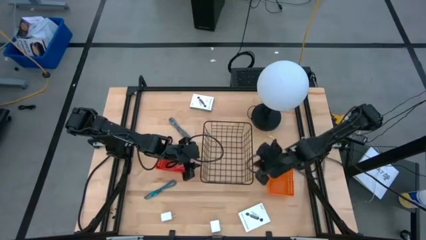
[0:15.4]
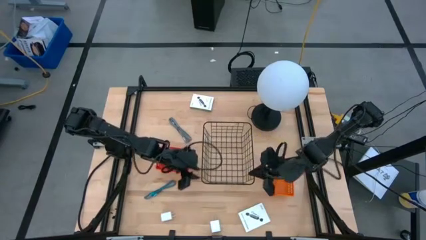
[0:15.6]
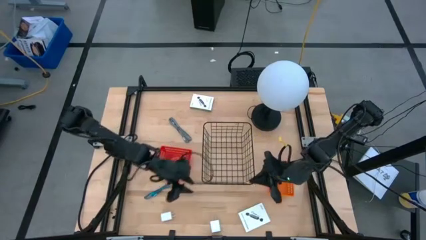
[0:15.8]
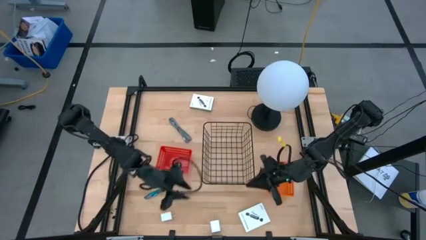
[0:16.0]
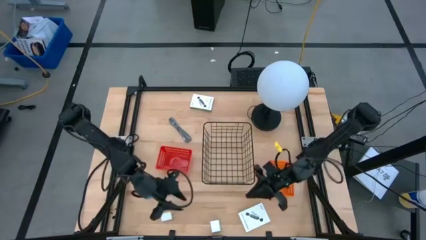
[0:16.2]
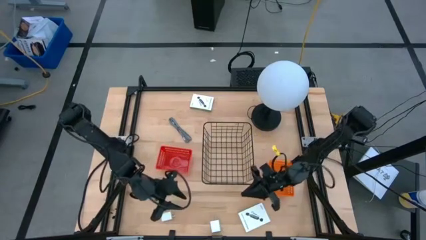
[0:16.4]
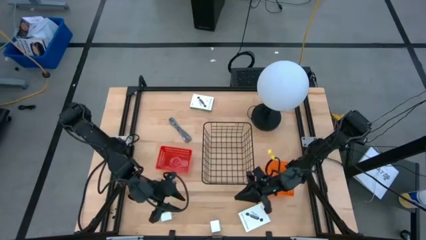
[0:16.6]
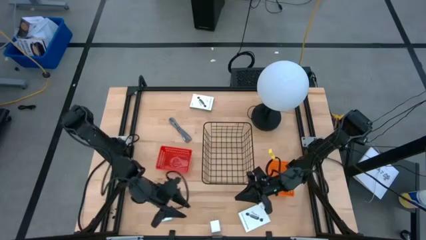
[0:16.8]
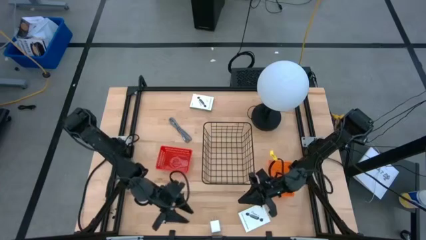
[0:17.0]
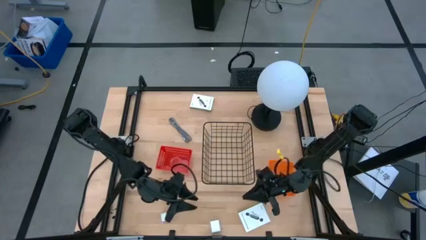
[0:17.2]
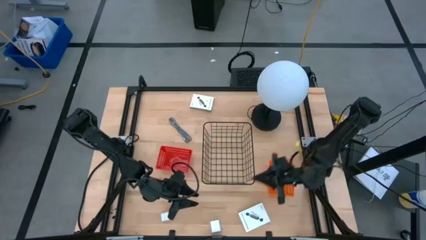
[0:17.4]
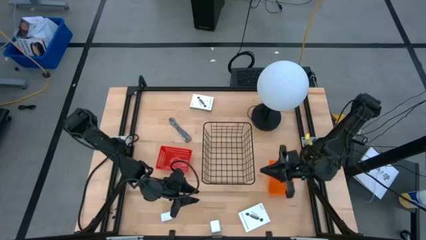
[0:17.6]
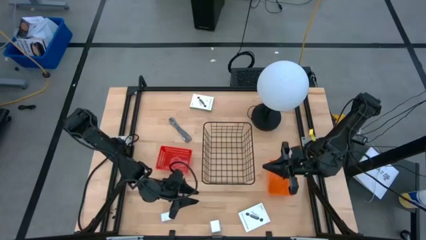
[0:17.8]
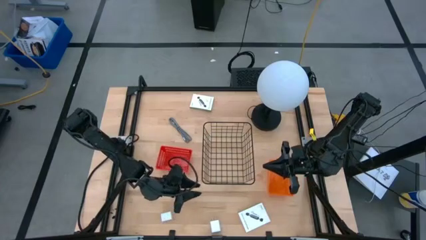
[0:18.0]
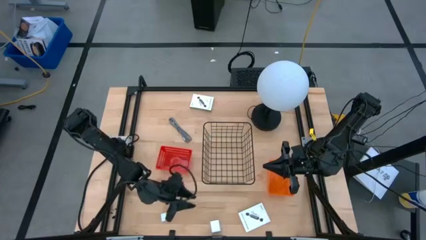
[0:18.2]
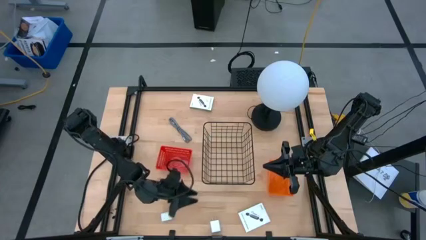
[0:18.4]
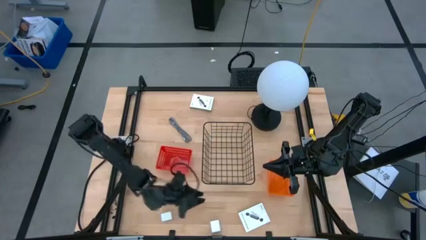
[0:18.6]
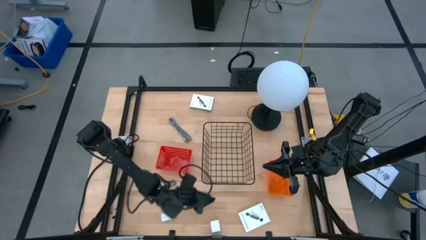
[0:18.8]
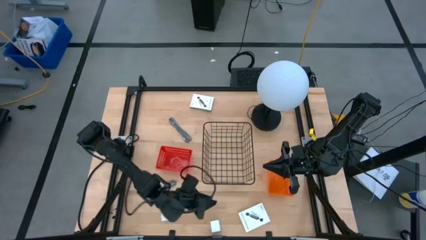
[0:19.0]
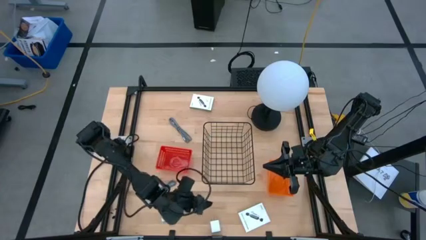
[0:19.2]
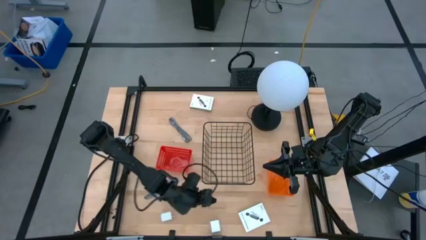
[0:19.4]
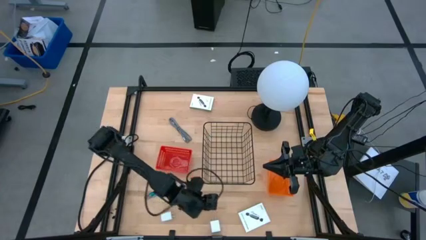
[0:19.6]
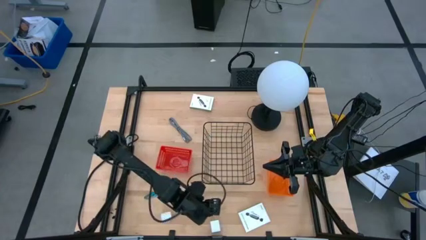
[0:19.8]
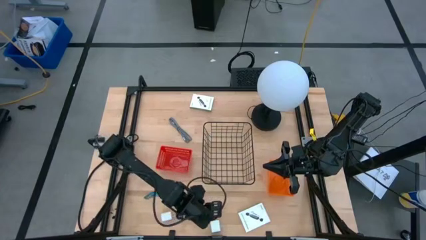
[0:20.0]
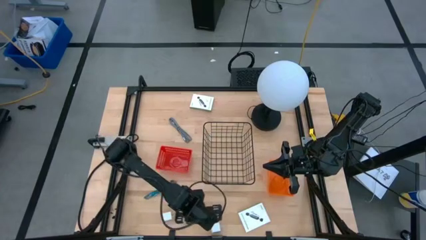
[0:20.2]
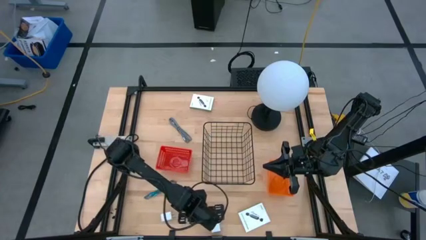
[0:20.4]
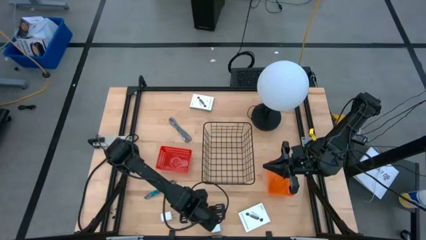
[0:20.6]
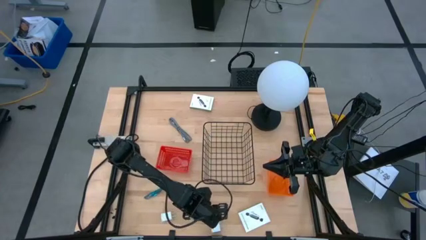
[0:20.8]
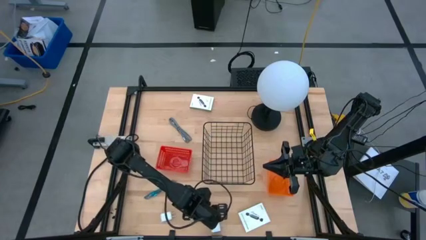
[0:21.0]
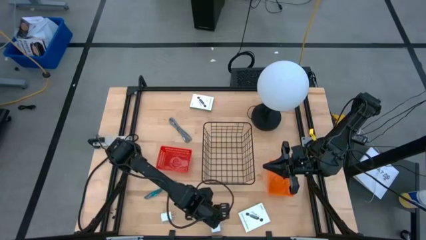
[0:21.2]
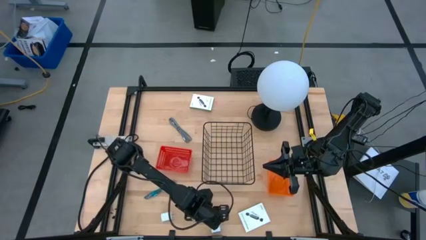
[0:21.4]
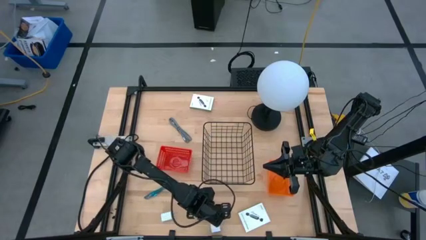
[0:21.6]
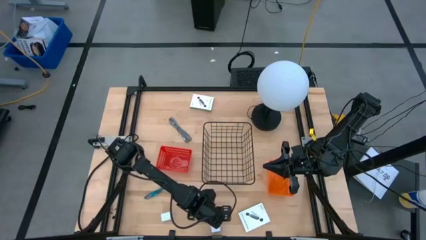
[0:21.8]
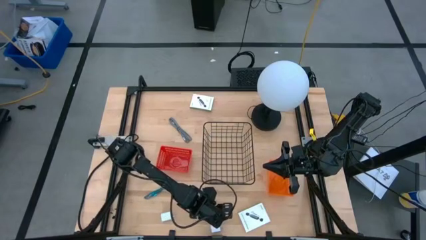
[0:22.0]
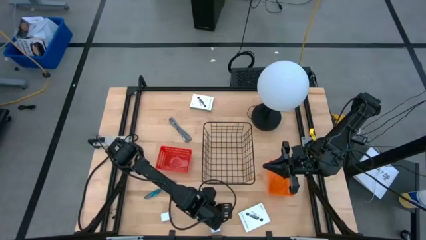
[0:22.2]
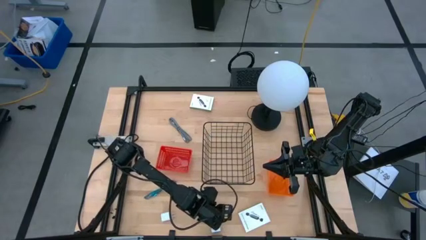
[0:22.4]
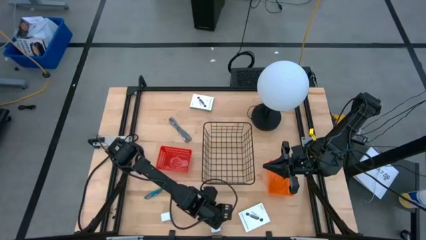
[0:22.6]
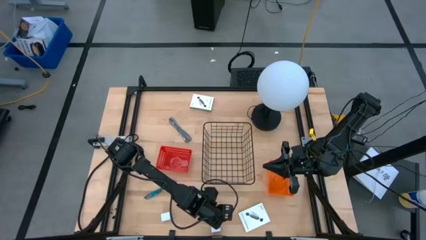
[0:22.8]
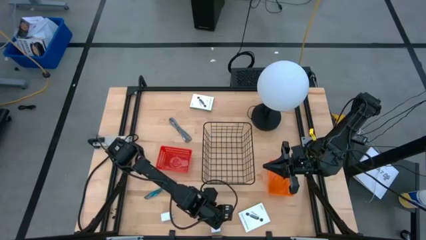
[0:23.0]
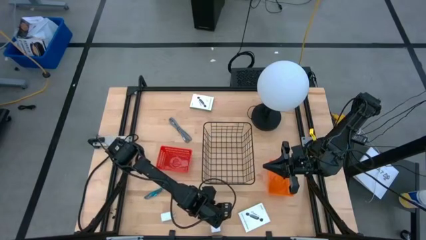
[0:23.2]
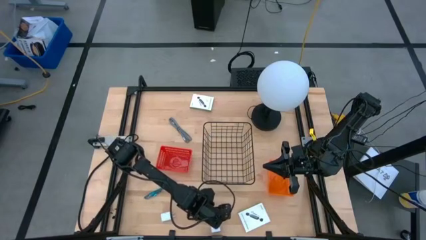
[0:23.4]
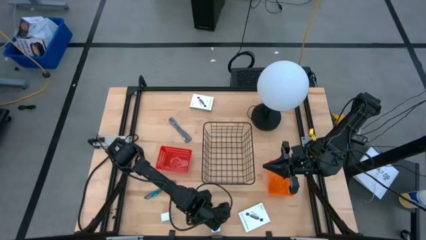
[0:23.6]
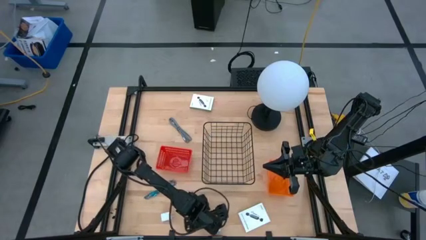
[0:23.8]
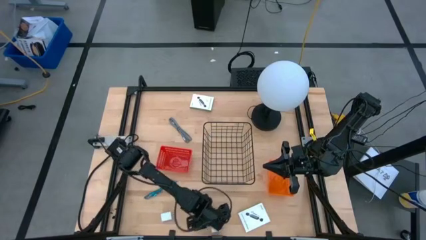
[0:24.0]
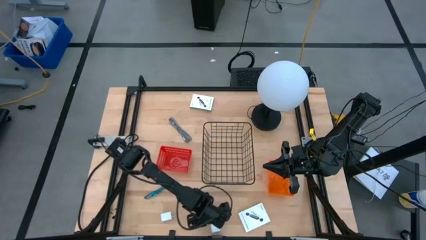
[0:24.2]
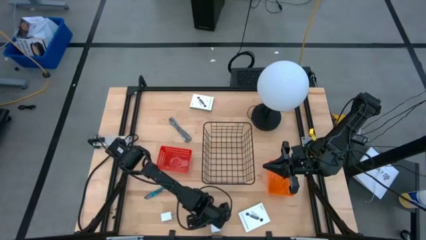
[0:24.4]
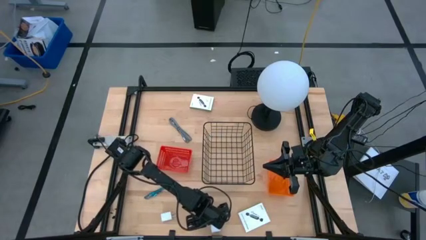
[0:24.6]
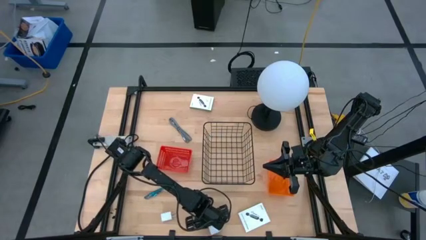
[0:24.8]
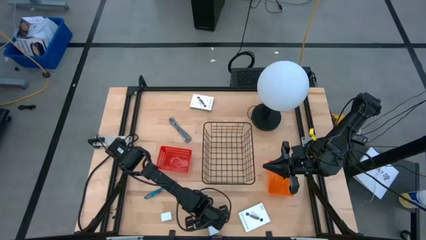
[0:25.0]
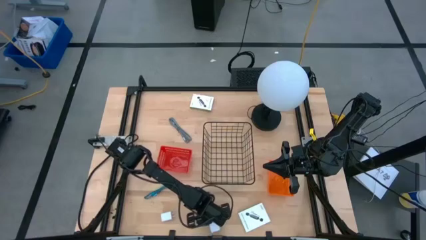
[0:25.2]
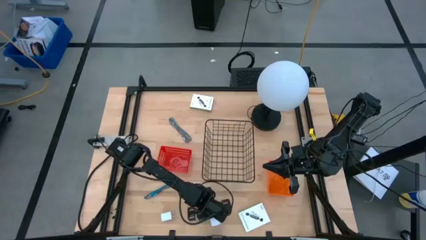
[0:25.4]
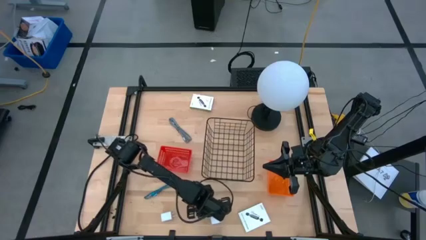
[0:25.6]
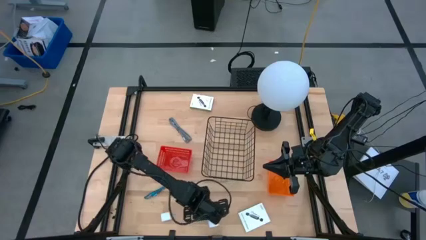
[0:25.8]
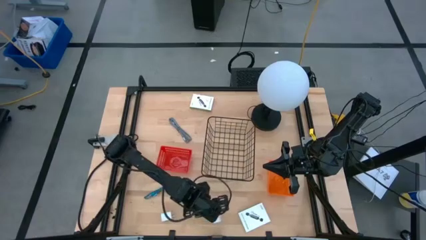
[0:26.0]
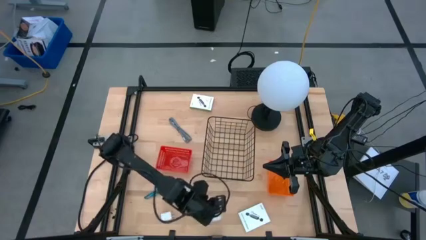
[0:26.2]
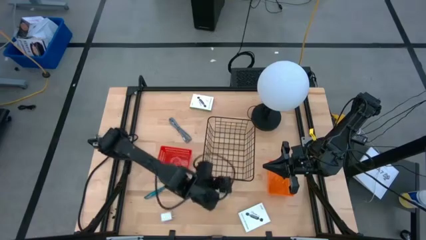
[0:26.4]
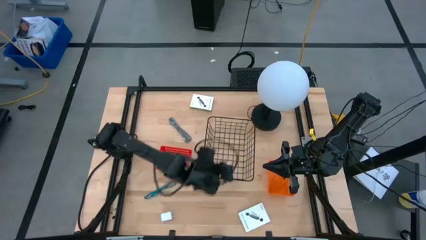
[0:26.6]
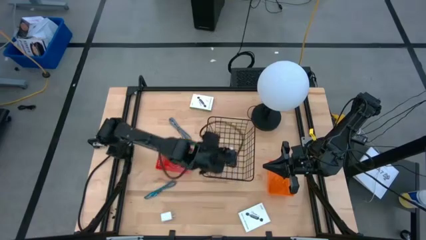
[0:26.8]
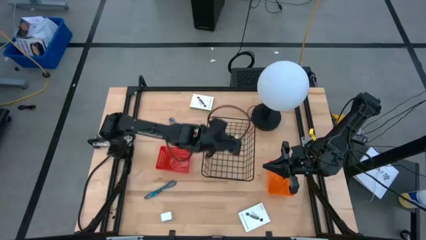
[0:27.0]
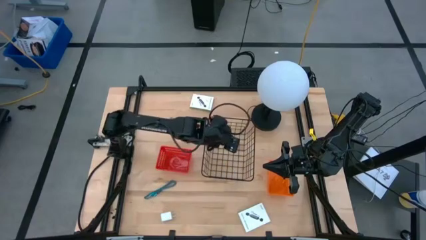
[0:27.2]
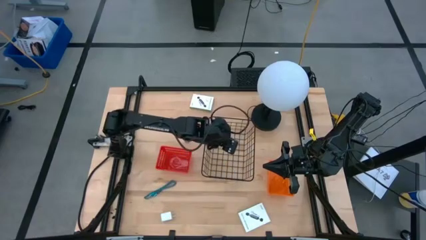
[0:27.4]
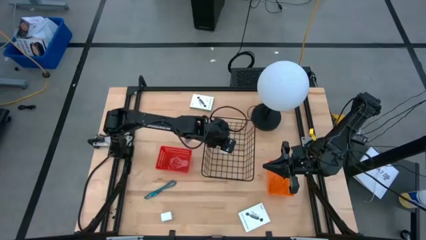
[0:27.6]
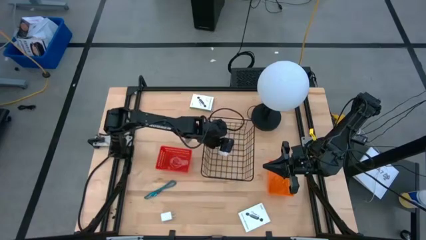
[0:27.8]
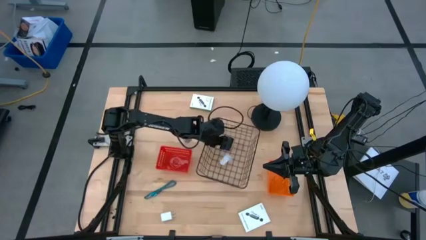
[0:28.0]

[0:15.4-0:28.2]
Task: Pick and place items into bin
Put the right charger adapter into the black wire basket
